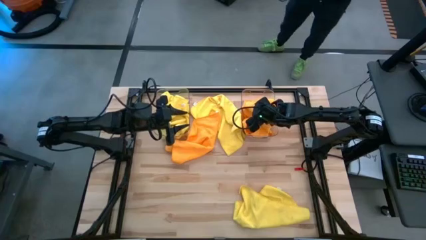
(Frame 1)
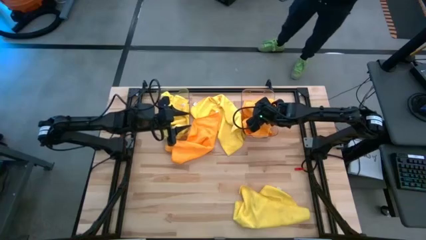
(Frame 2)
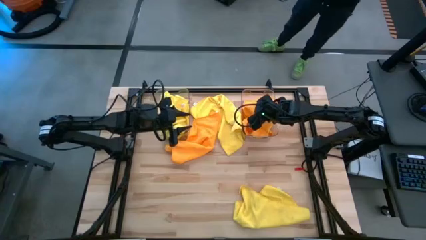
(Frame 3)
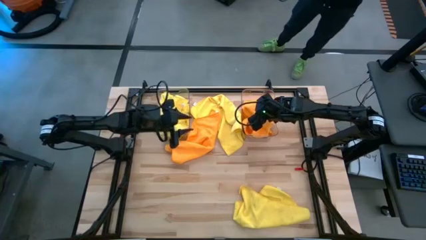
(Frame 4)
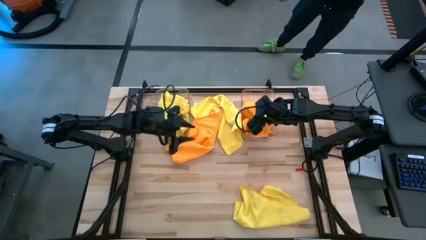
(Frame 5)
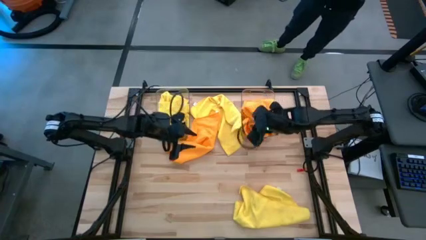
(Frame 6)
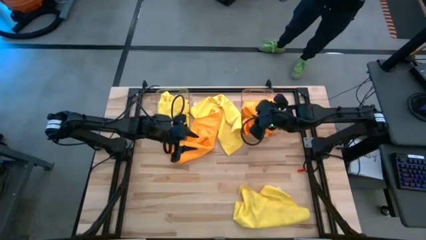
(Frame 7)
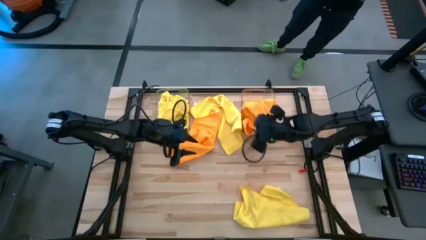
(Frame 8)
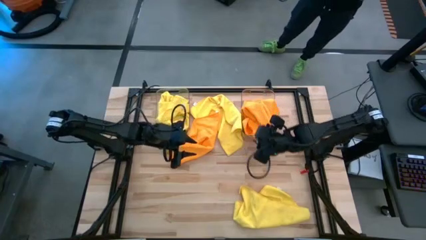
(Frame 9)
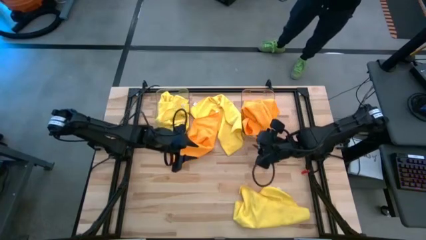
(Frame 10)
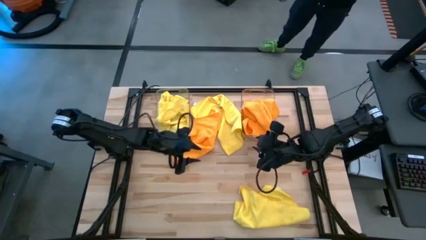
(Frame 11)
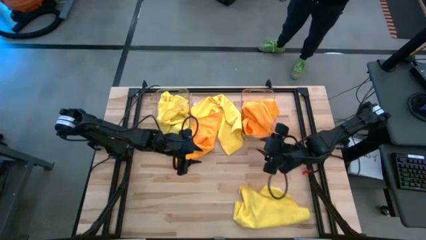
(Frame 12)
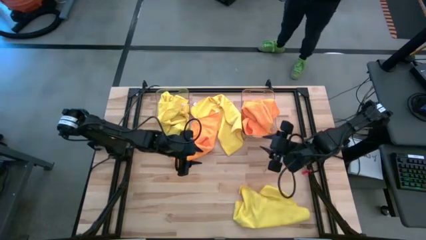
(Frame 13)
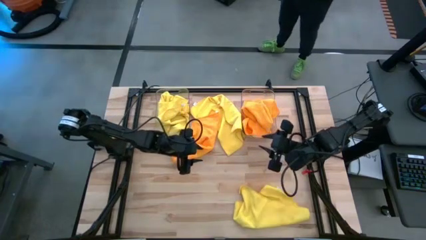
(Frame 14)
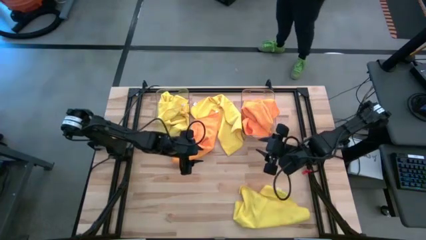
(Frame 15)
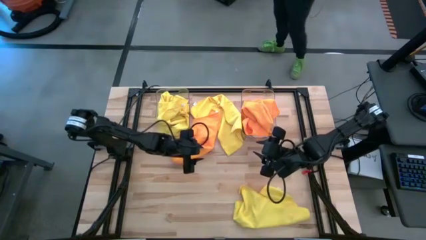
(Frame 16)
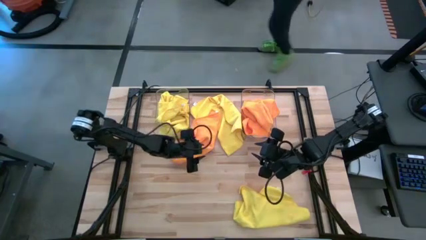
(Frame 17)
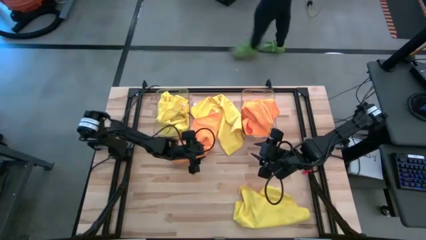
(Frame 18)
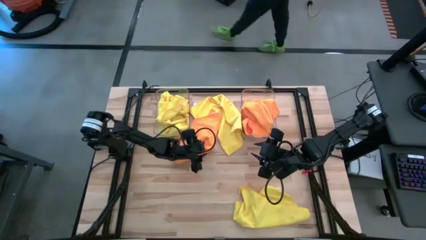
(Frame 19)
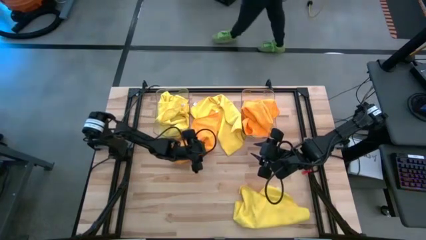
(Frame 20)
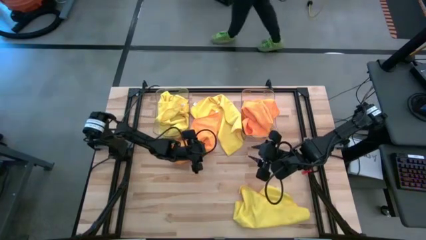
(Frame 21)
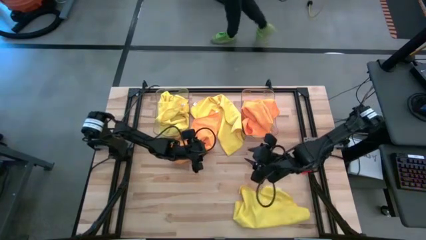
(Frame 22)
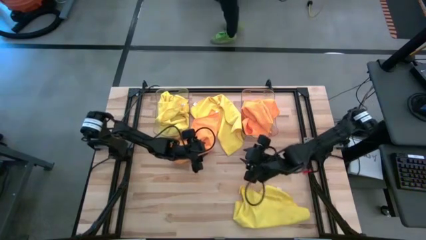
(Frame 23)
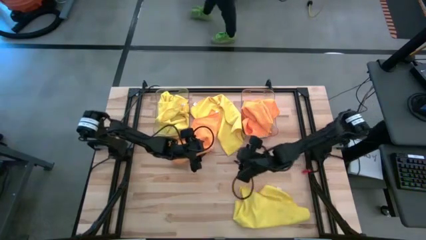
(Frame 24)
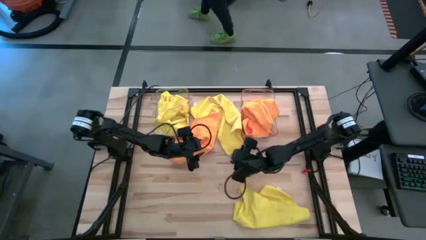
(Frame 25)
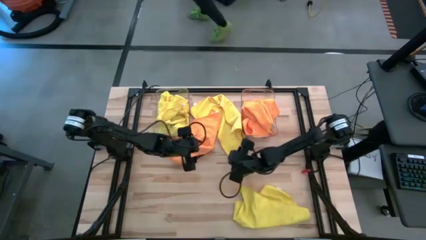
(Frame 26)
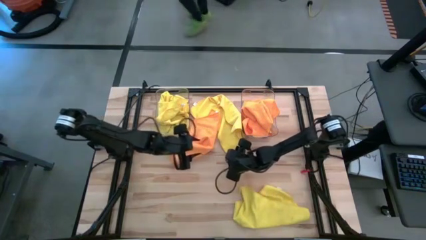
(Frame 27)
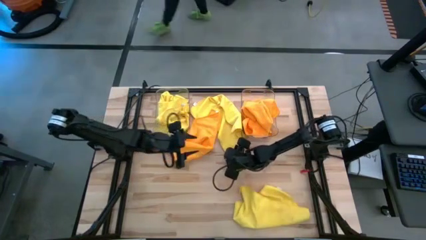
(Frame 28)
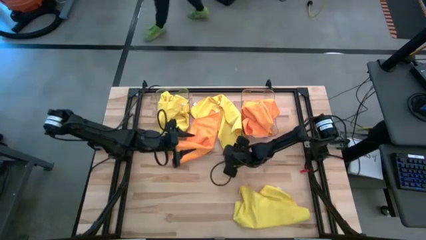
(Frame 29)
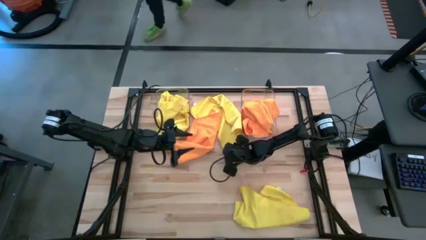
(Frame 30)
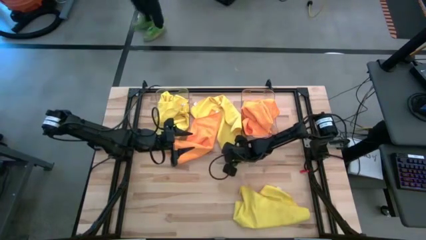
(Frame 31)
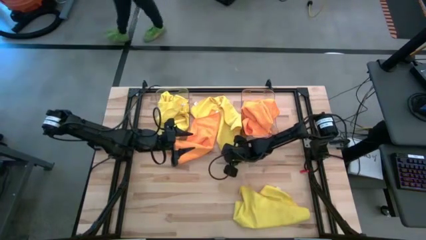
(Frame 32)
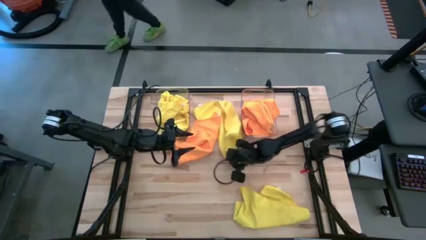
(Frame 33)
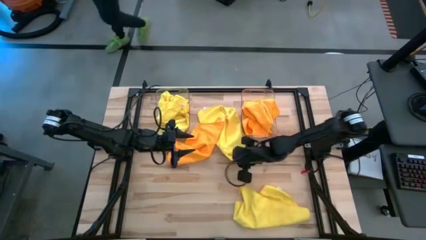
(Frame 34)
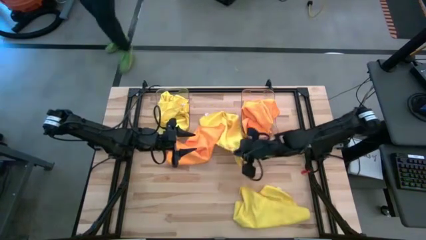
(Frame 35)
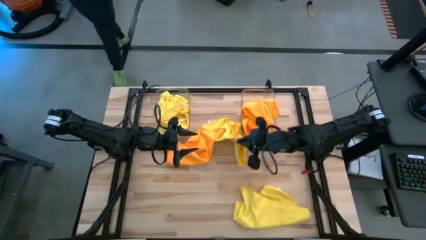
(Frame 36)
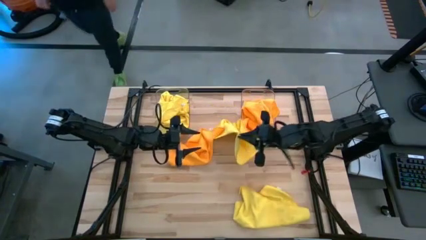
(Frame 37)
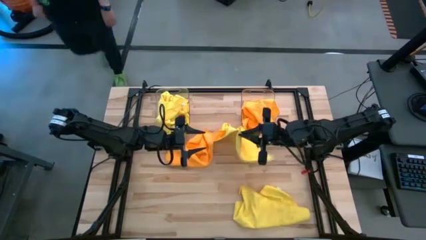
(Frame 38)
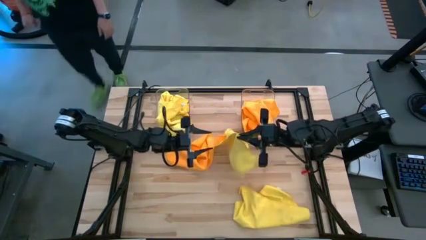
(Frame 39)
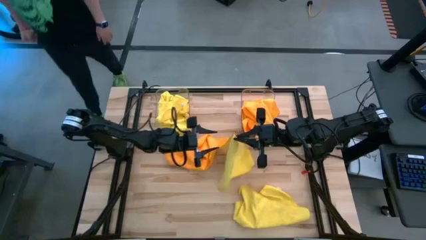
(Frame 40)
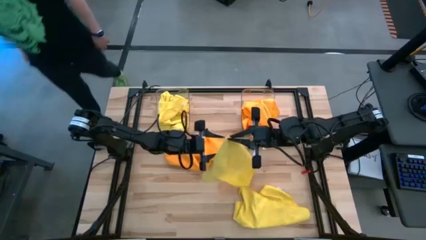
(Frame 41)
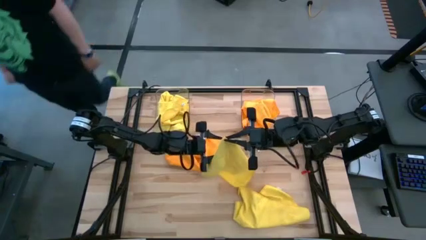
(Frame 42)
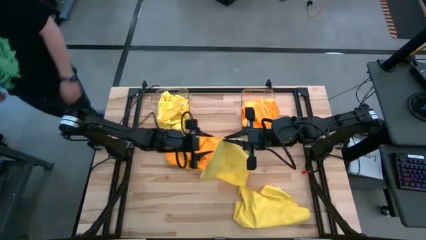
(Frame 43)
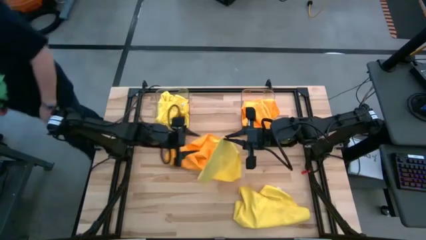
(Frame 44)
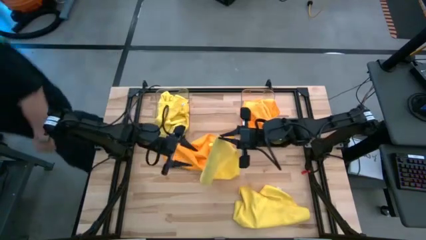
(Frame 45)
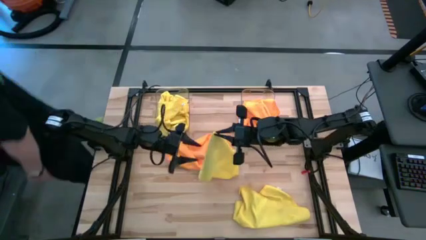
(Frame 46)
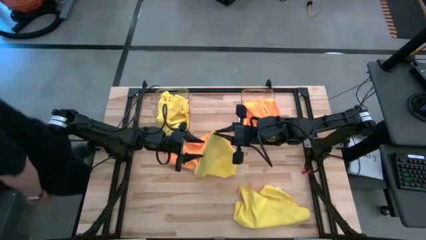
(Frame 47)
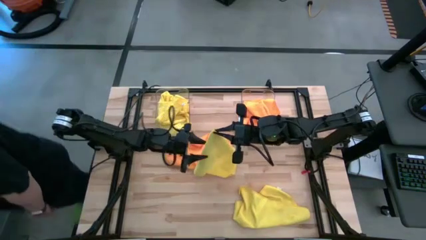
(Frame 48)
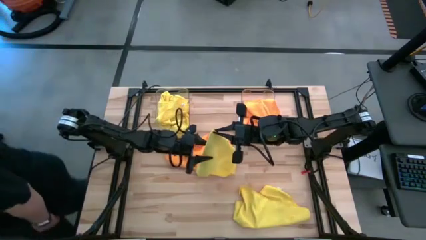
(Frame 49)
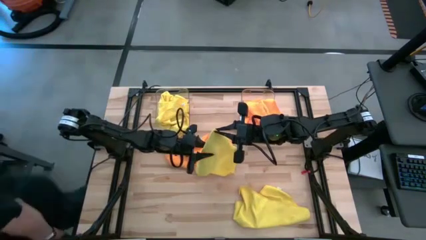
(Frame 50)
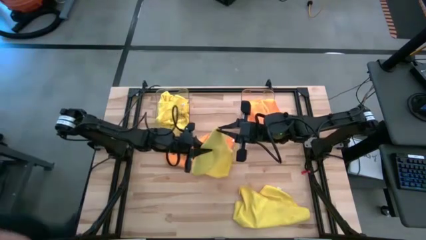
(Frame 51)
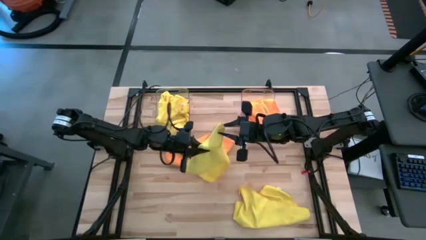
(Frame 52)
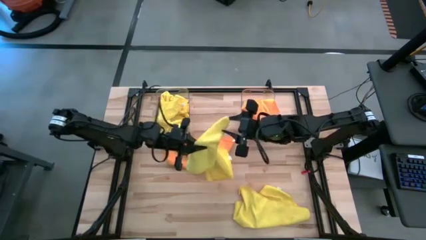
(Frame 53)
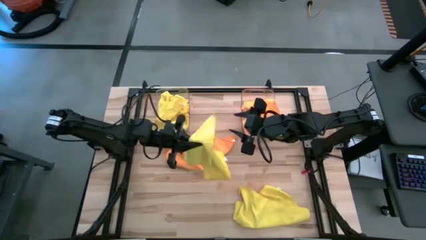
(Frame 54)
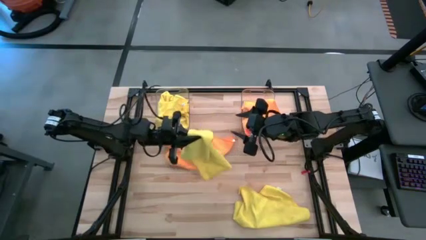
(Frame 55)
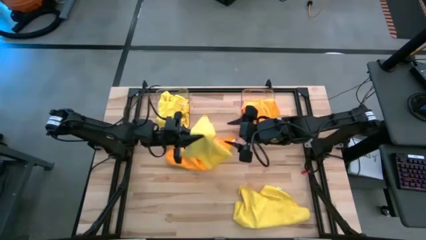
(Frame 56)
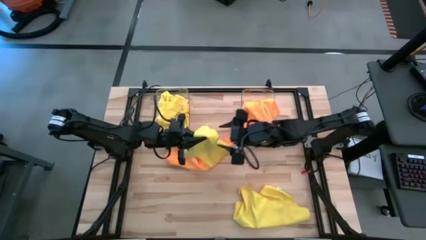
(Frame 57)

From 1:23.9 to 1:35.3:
Task: Sort microfiber towel by color & place in baskets
Put the yellow microfiber cloth into the left transparent bin

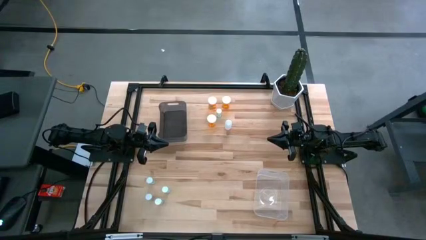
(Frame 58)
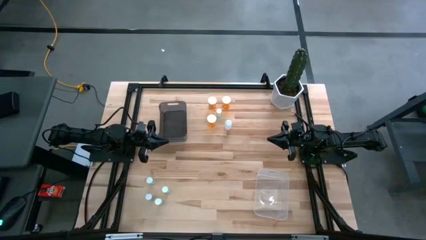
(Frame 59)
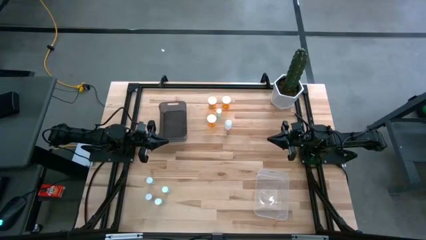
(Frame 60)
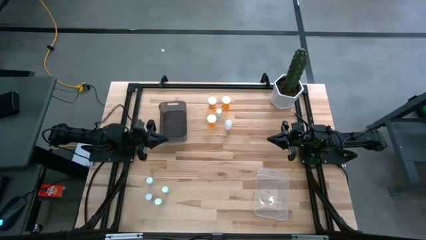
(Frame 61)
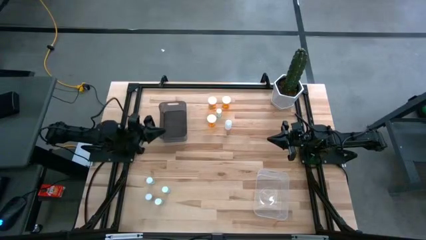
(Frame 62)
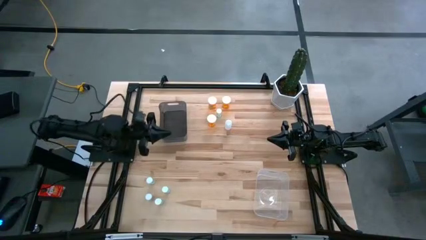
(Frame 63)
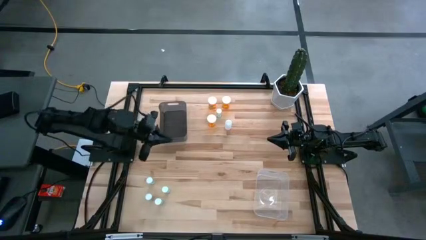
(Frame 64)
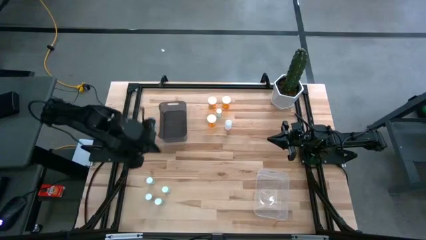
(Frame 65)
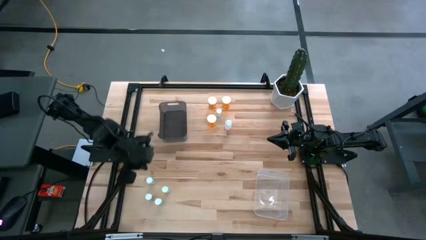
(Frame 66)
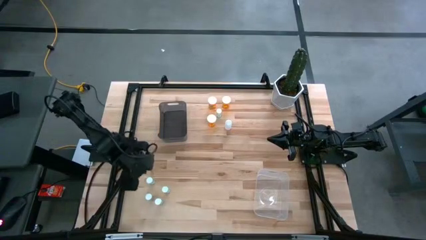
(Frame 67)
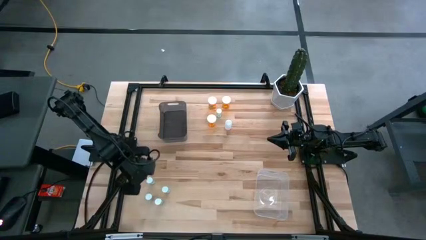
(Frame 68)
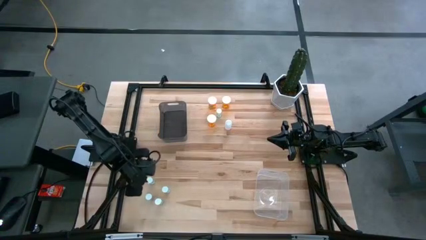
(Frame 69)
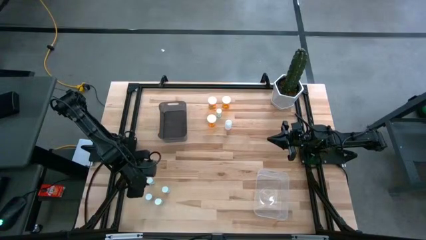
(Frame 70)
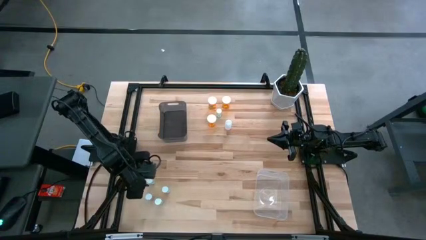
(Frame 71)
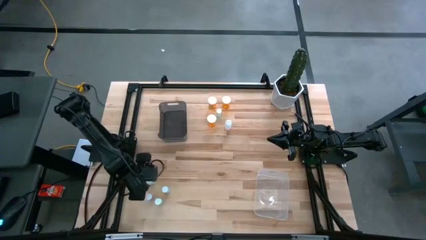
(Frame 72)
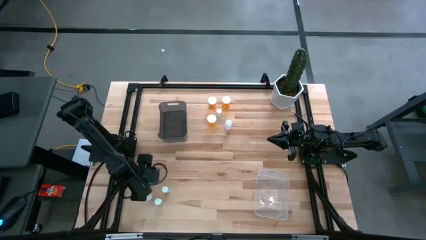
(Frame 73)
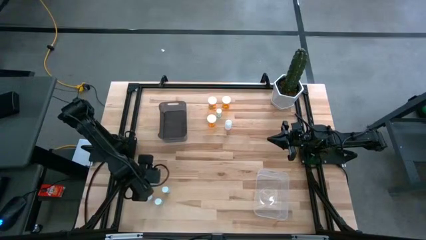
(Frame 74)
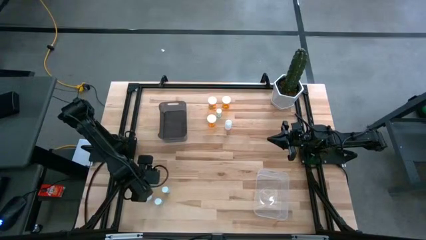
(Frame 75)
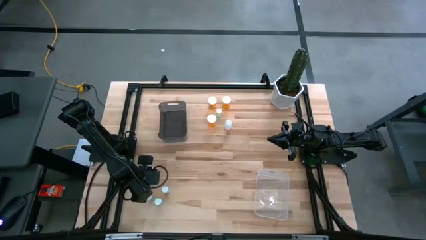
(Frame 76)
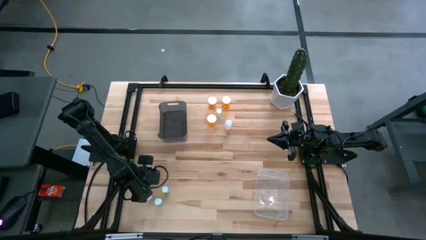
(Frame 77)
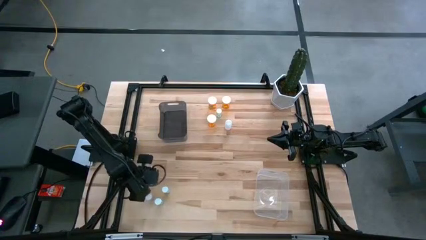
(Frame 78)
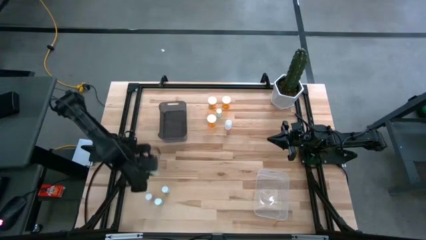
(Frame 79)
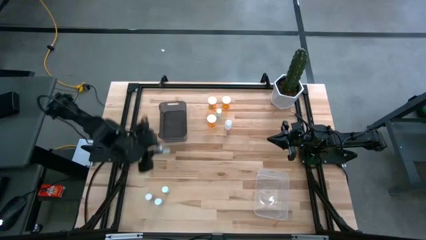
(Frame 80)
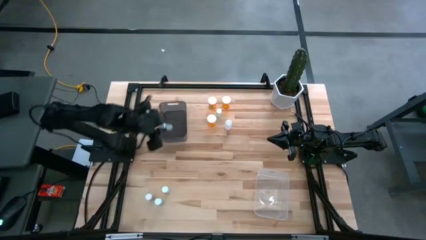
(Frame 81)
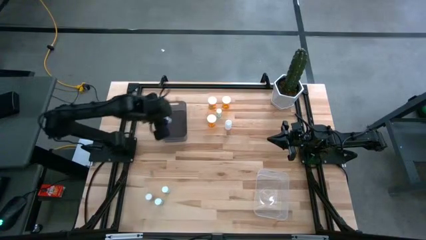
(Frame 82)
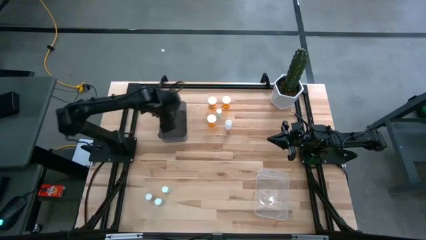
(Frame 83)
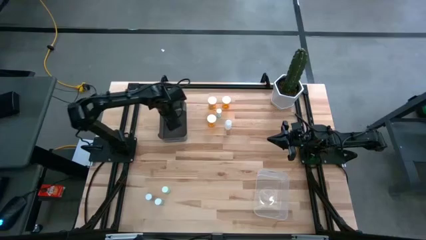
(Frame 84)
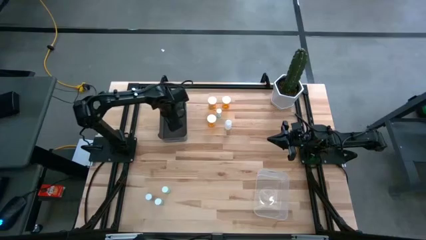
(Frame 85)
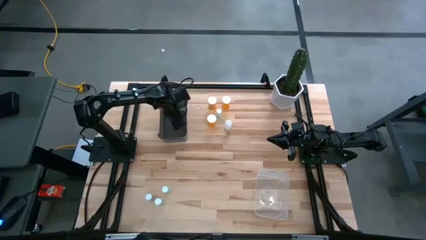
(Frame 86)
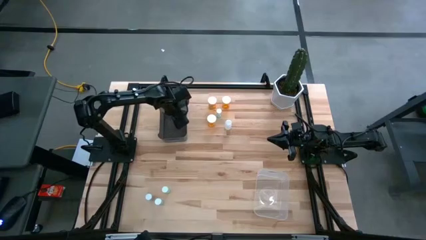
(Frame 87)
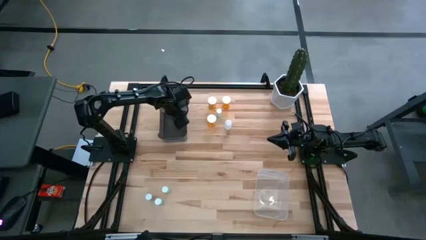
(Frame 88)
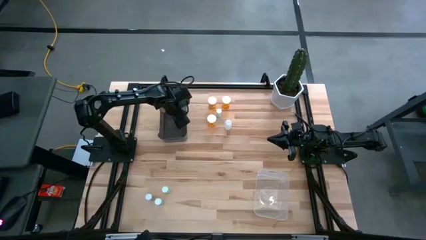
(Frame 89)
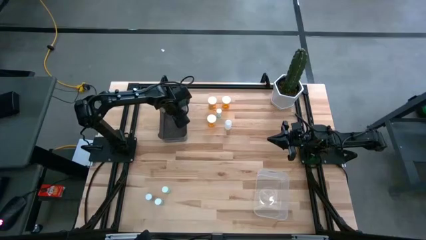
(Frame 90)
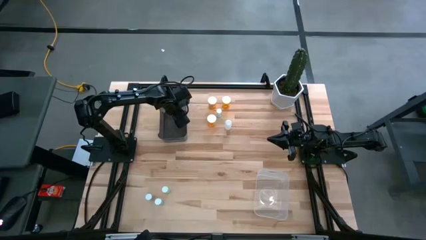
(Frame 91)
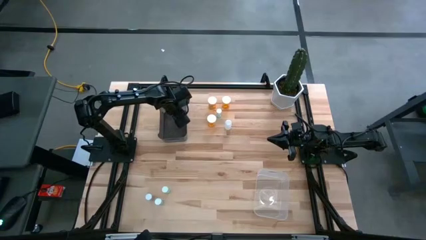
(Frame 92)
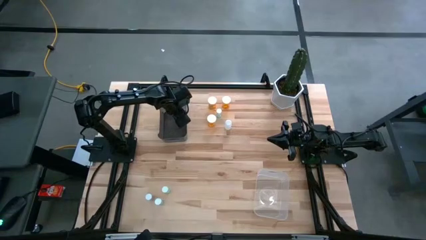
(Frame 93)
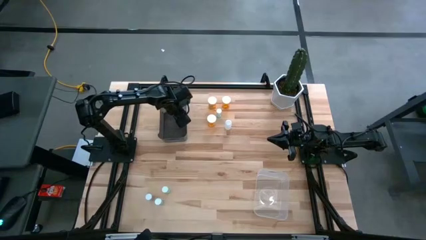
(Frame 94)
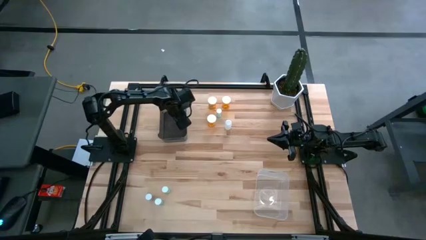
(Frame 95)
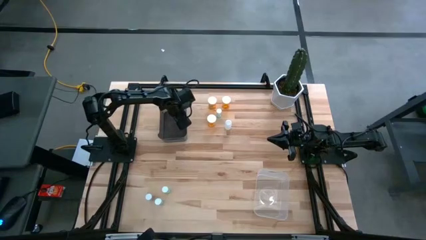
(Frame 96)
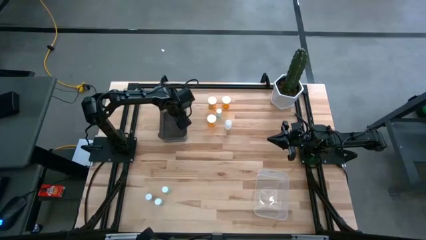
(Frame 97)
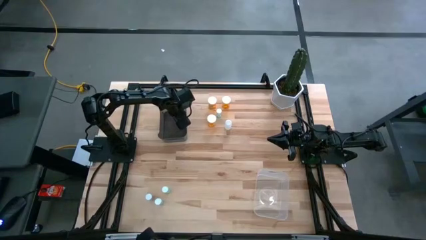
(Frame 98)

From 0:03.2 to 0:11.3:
Task: Pick and place medicine bottles into bin by pill shape (circle, oval)
Put the small blue medicine bottle into the black bin
